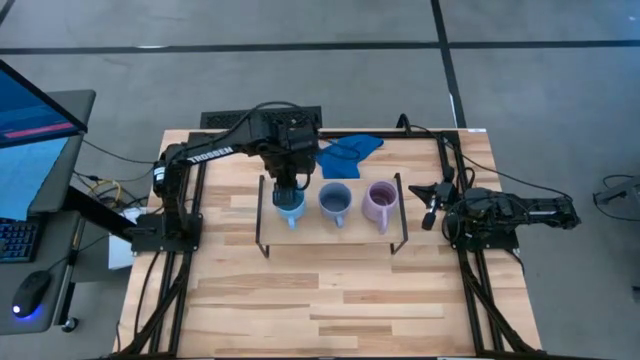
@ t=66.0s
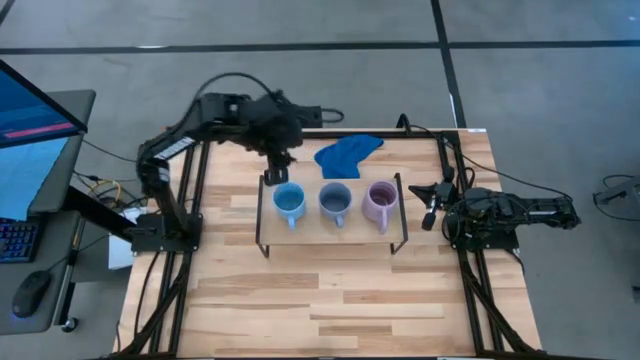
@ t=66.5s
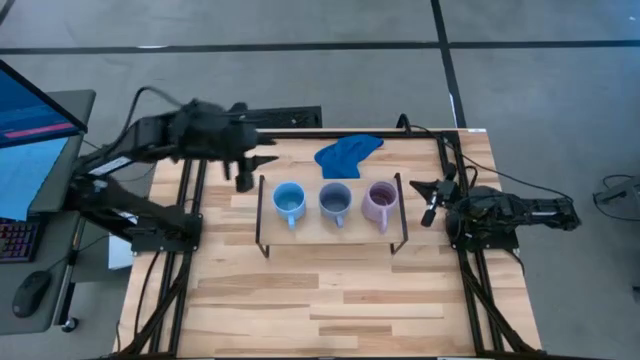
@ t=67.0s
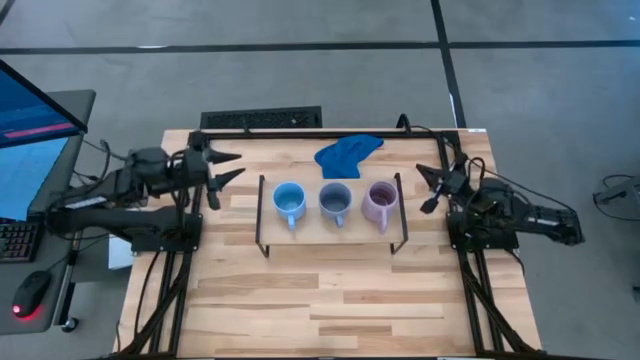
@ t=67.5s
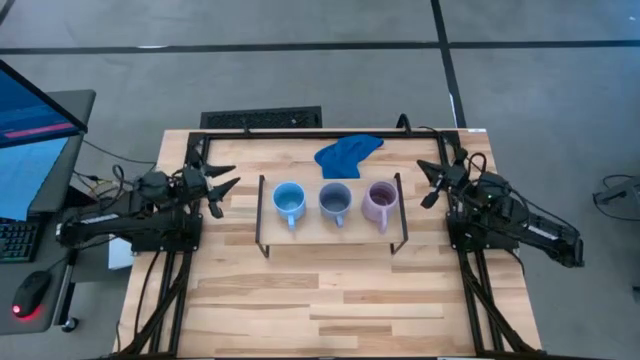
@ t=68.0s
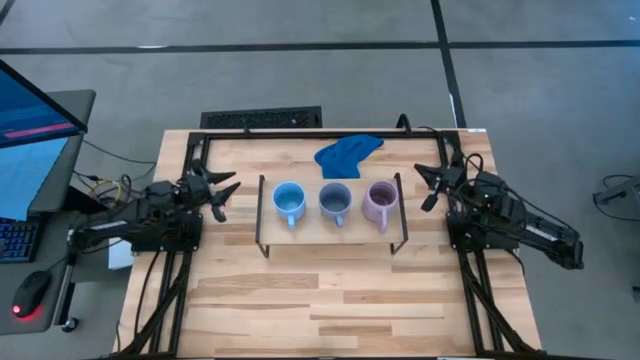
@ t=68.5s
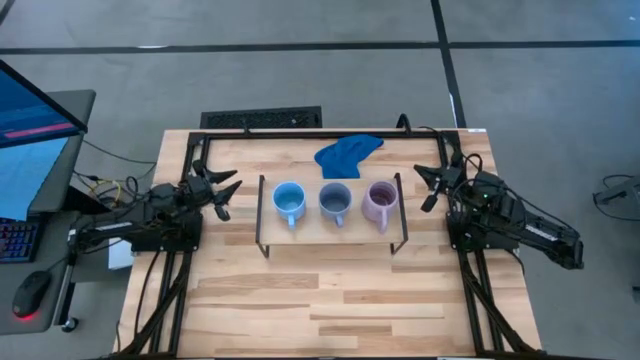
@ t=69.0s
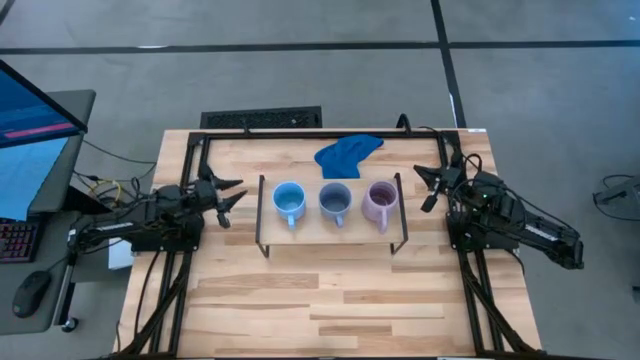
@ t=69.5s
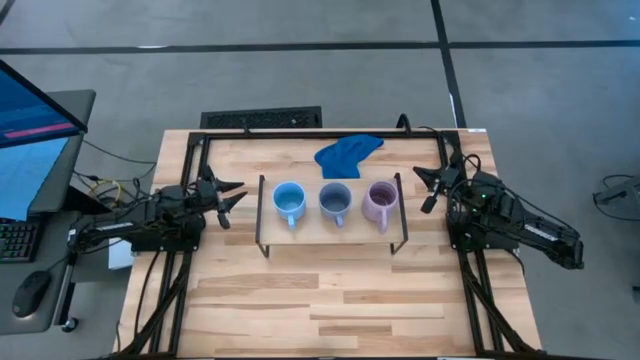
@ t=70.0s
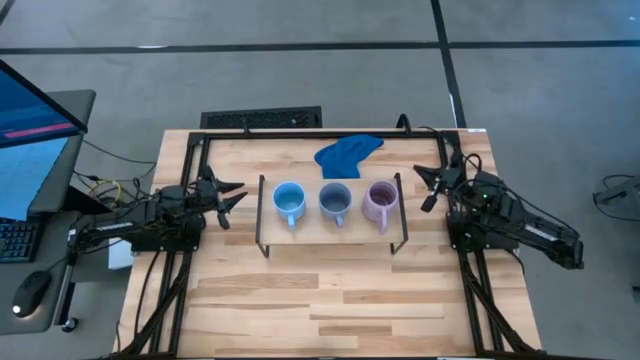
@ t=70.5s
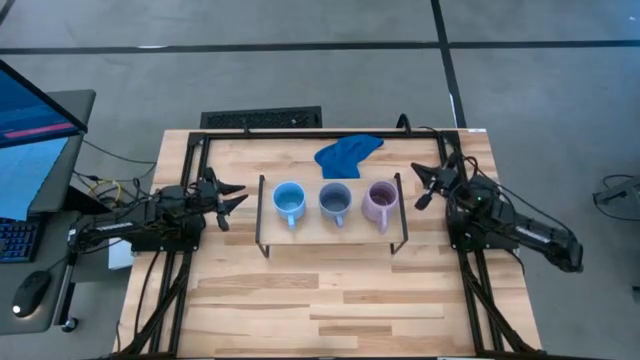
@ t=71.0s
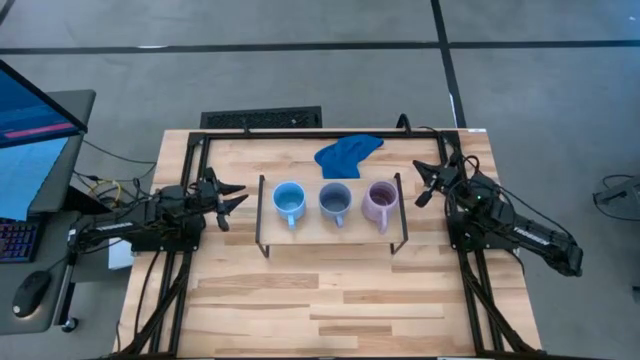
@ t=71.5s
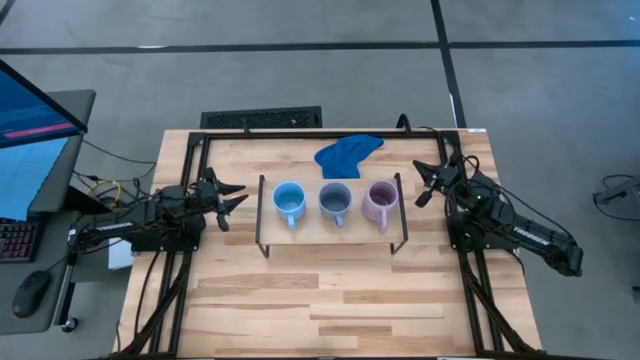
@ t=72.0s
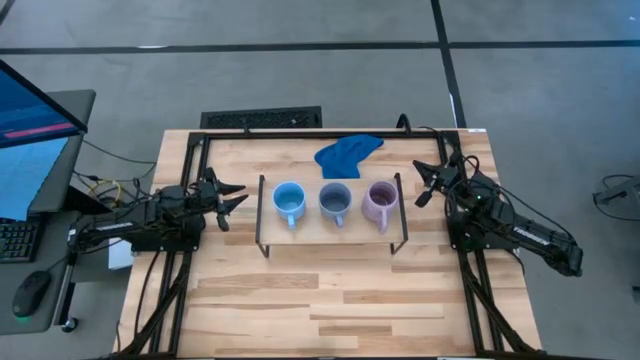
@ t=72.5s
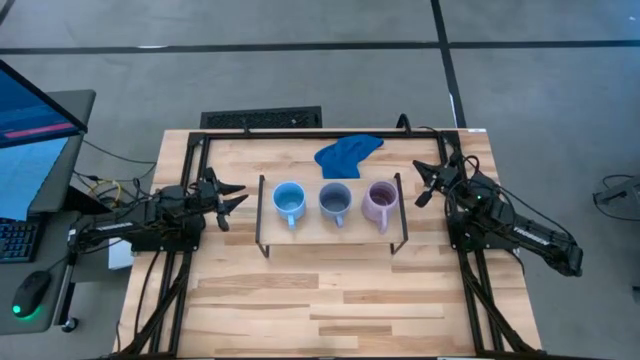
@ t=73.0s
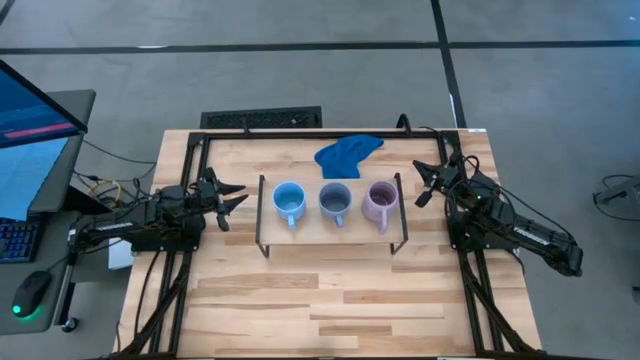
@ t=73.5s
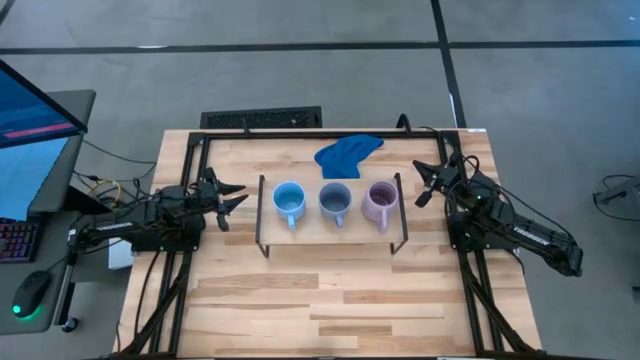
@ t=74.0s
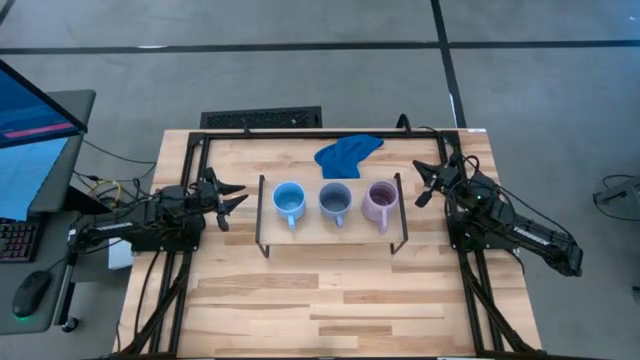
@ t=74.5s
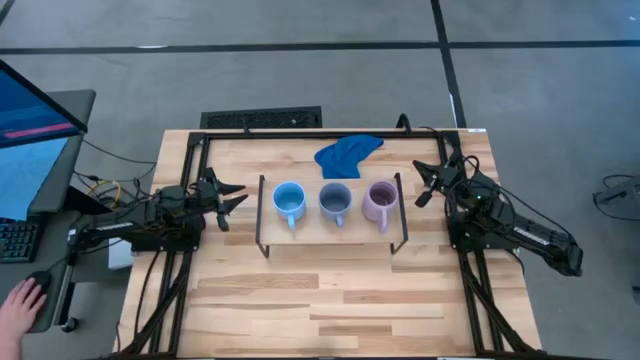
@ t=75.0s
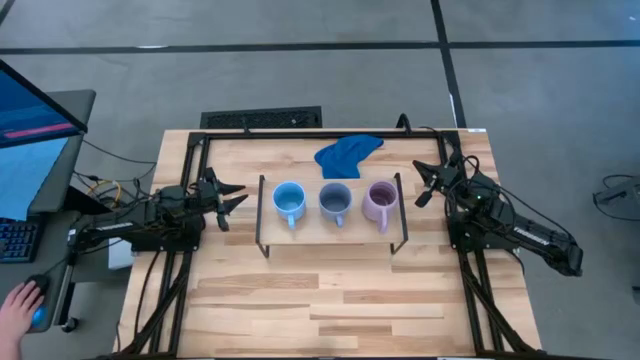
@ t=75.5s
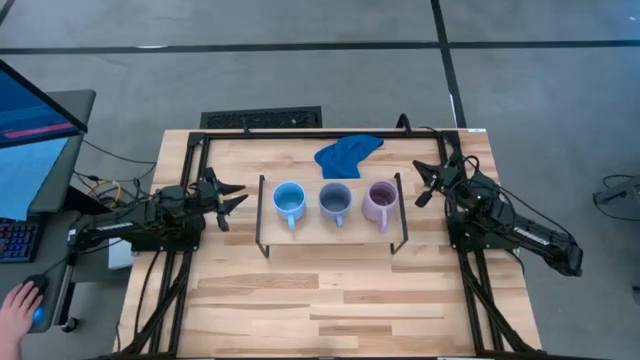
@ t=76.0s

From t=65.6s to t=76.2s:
Task: Stack small to large cups/mugs on shelf
Return to Home Position

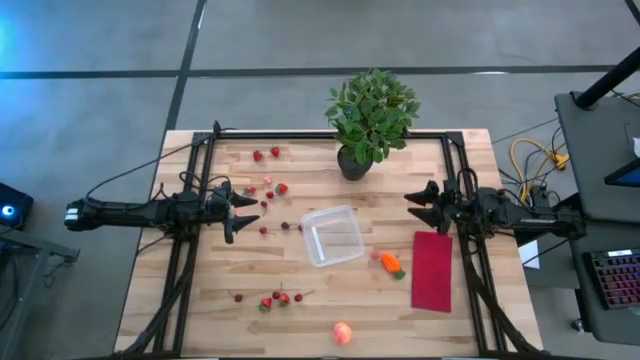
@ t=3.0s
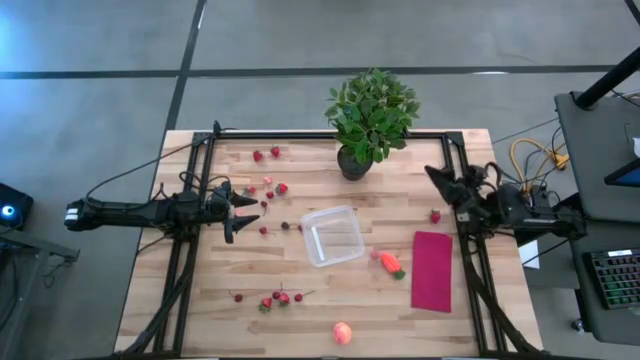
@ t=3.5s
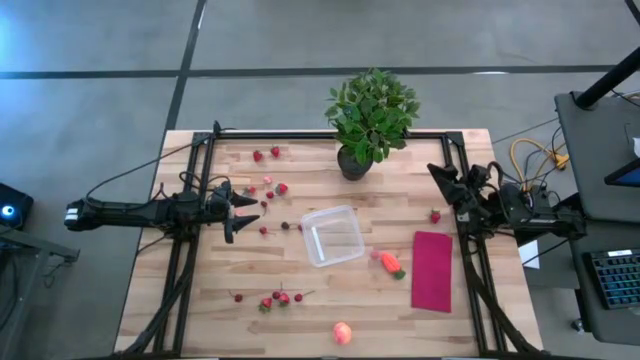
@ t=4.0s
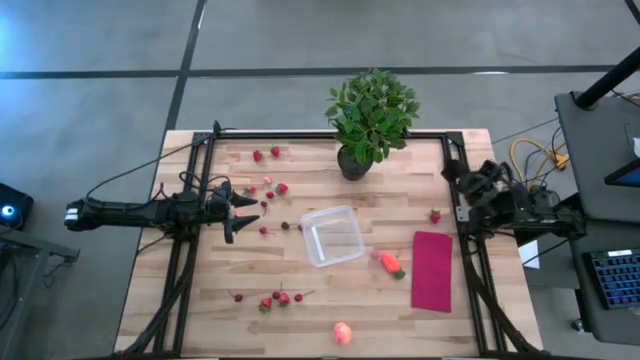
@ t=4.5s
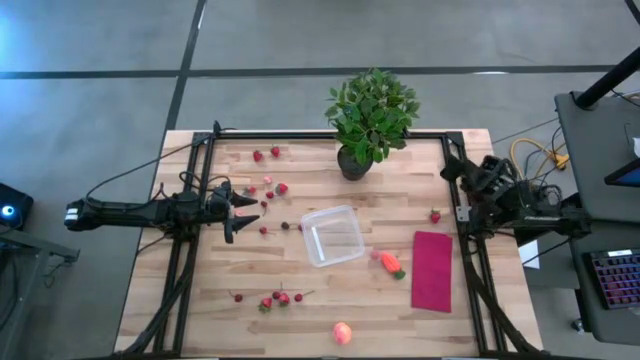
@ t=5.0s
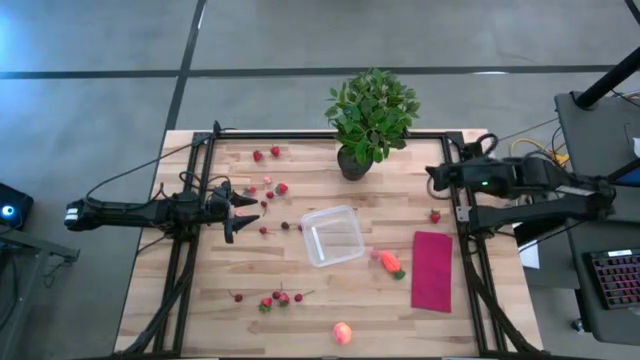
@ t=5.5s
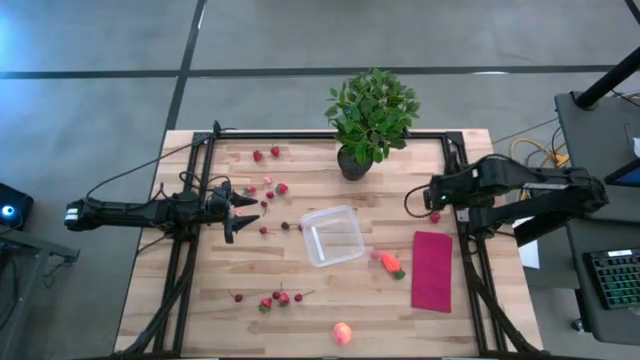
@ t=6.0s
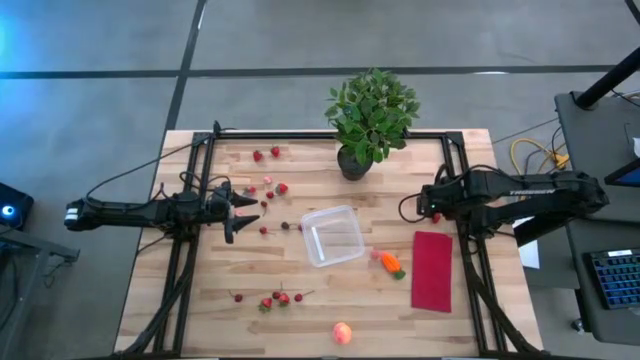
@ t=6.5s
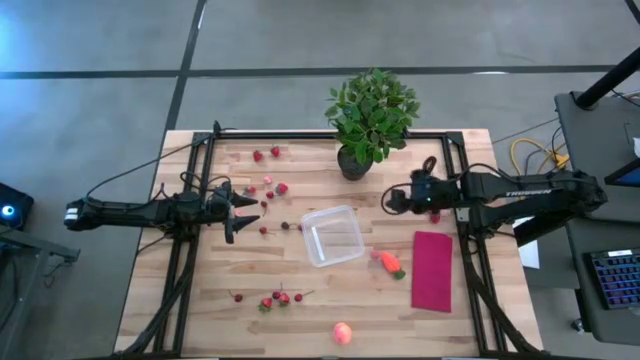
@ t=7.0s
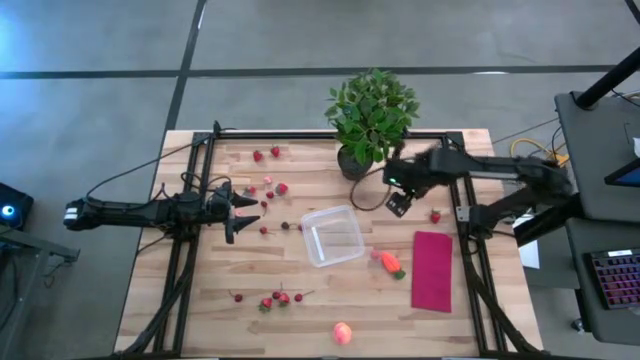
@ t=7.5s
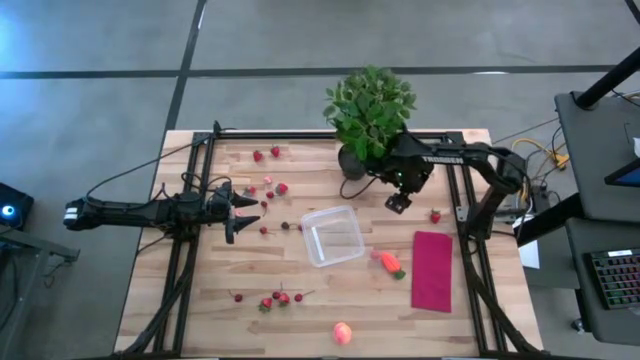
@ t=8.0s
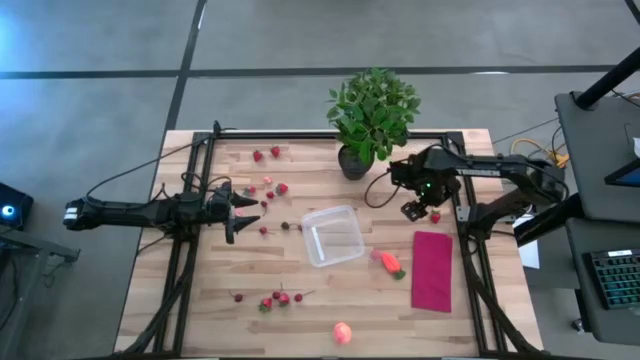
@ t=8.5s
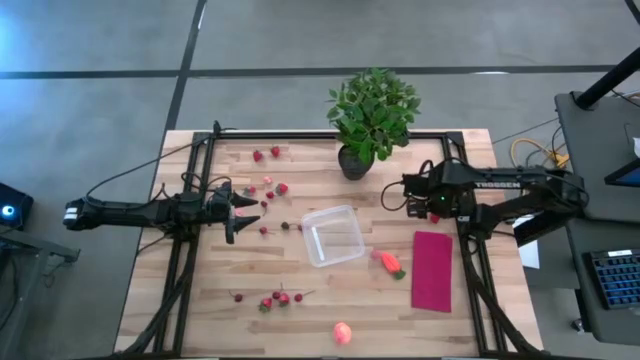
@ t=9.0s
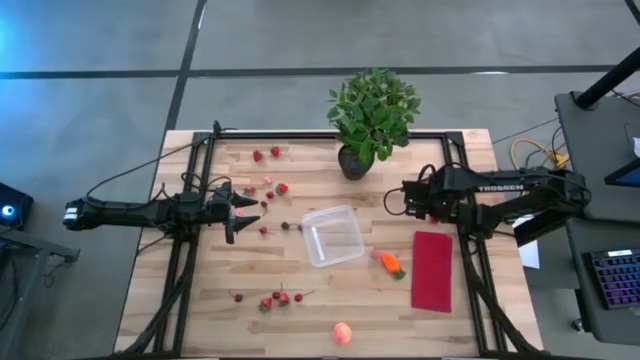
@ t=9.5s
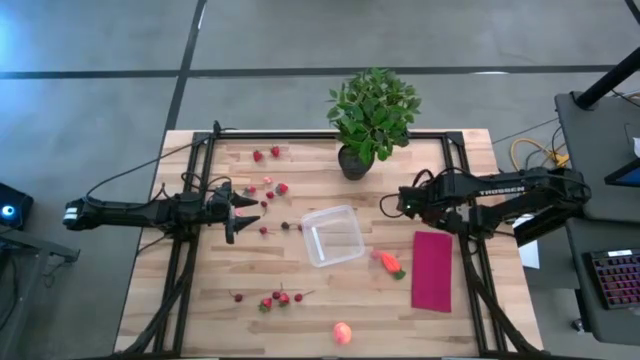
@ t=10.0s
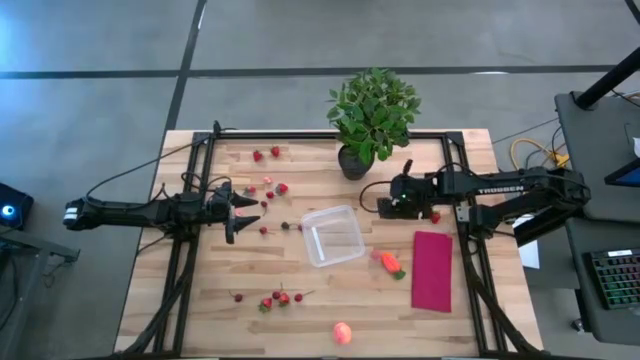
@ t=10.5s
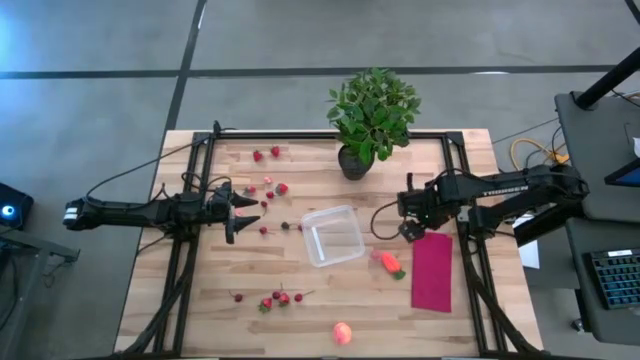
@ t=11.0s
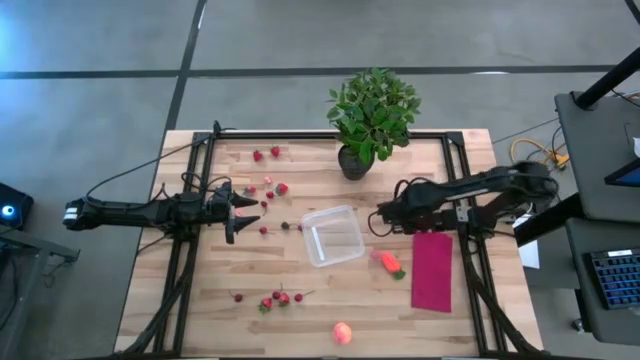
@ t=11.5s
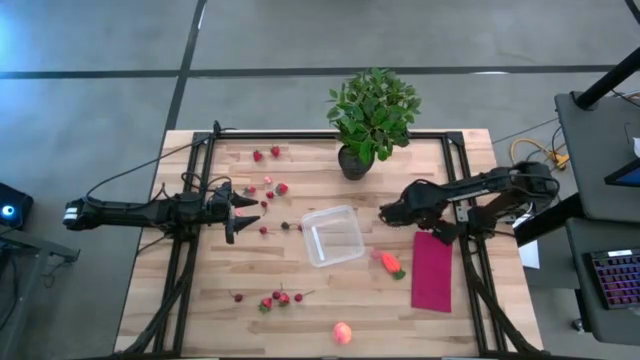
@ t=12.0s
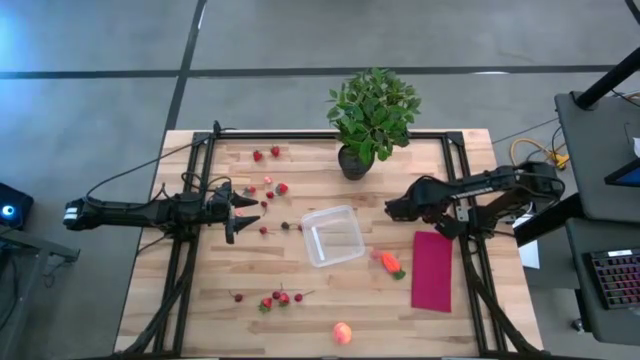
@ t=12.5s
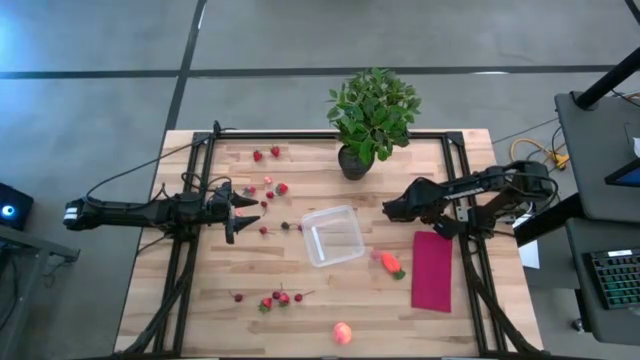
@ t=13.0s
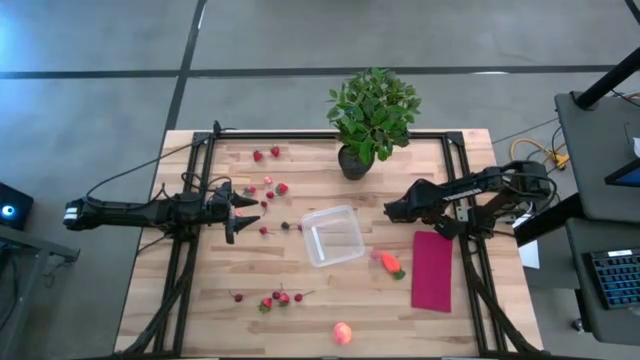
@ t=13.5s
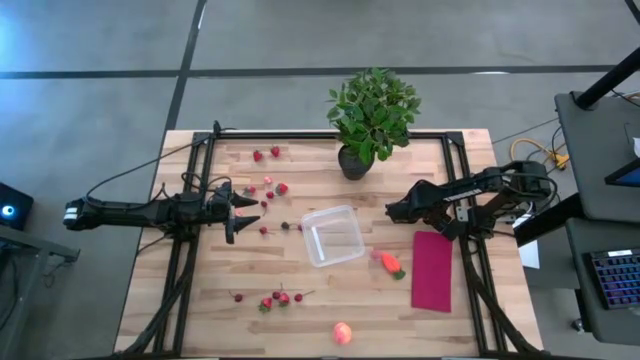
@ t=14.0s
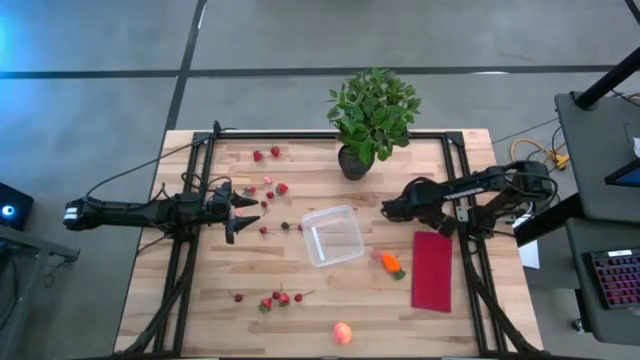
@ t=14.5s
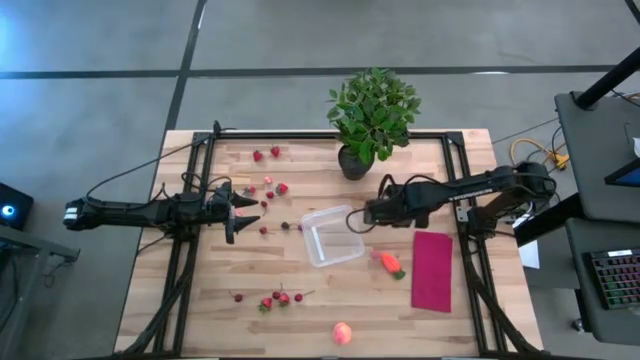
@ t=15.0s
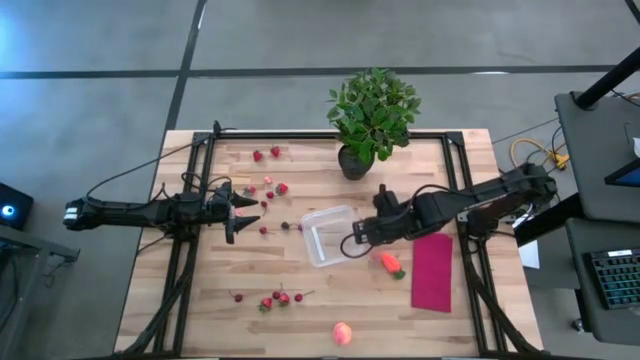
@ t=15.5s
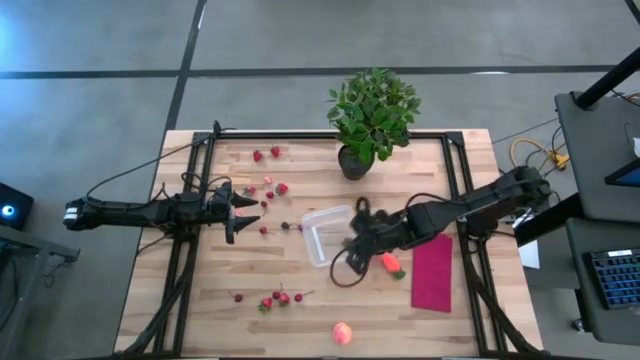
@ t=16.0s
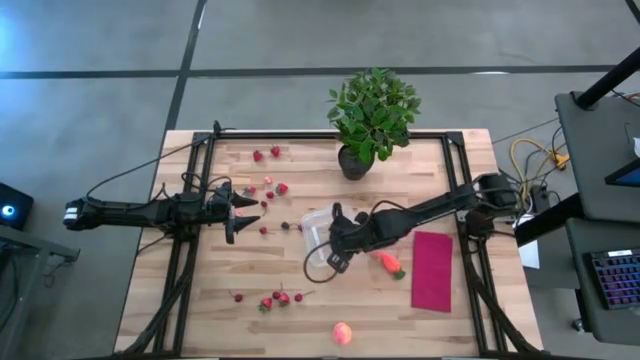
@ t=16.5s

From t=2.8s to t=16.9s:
Task: Pick and placing Produce into tupperware
Put the red strawberry into the transparent bin
